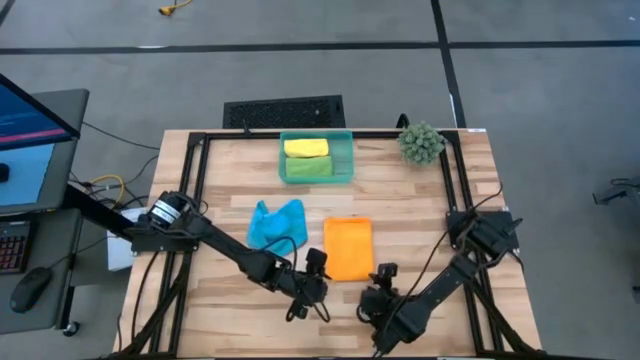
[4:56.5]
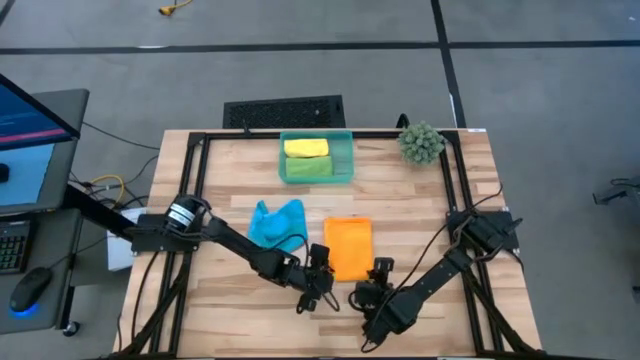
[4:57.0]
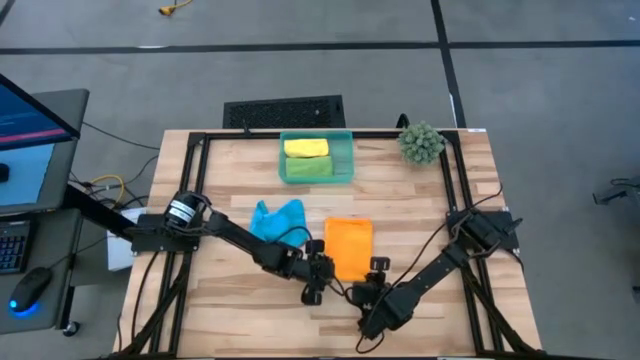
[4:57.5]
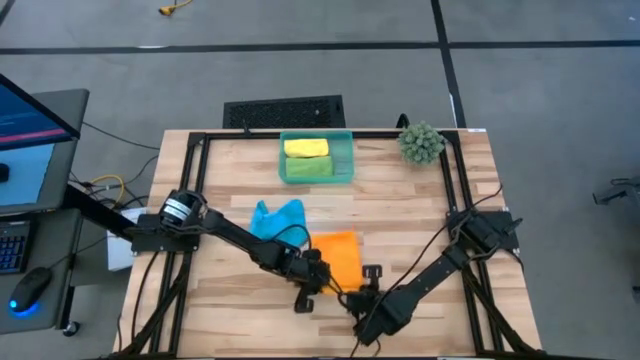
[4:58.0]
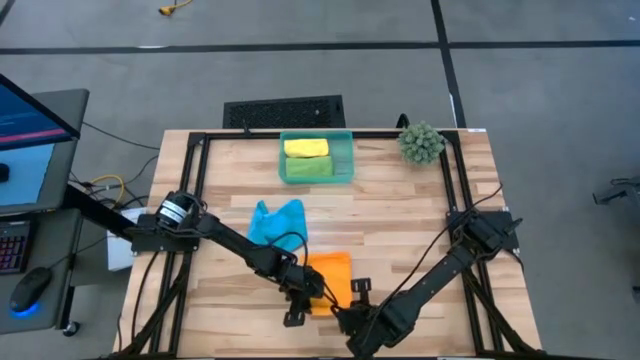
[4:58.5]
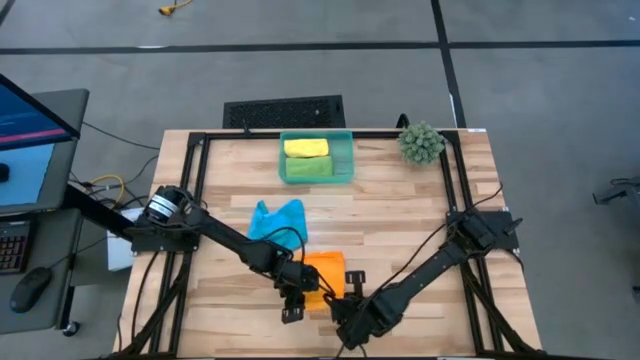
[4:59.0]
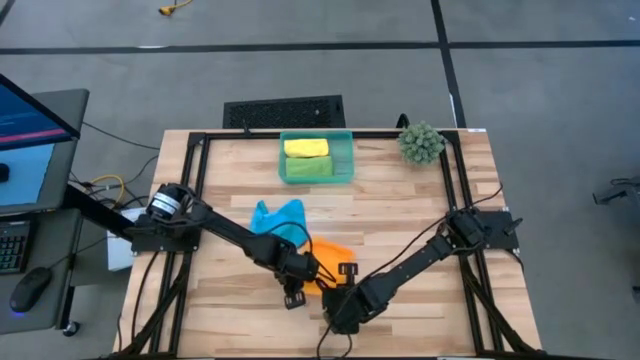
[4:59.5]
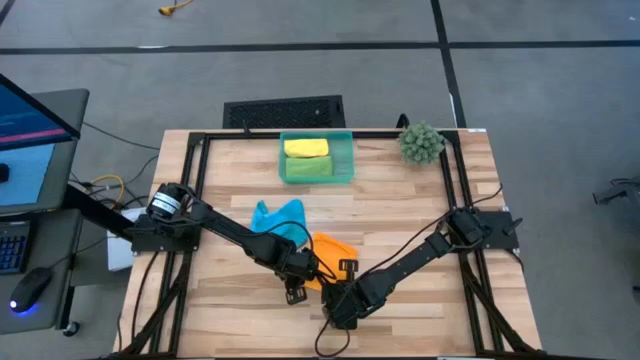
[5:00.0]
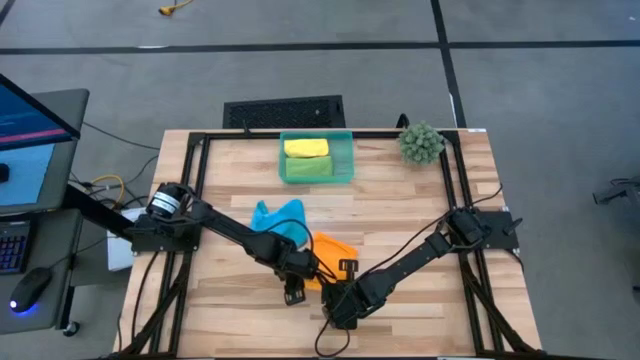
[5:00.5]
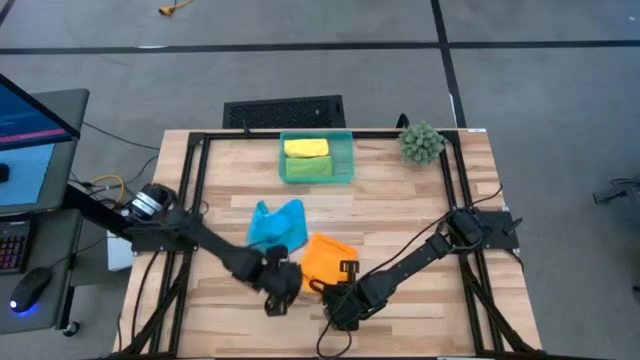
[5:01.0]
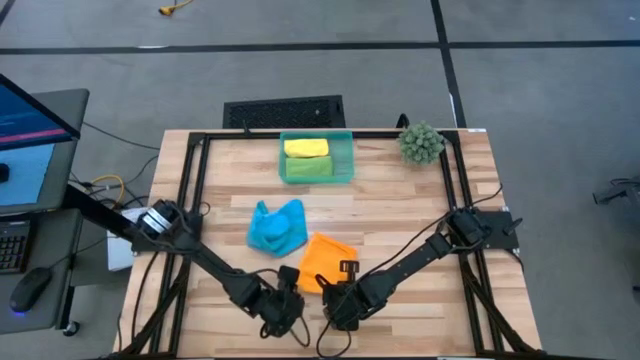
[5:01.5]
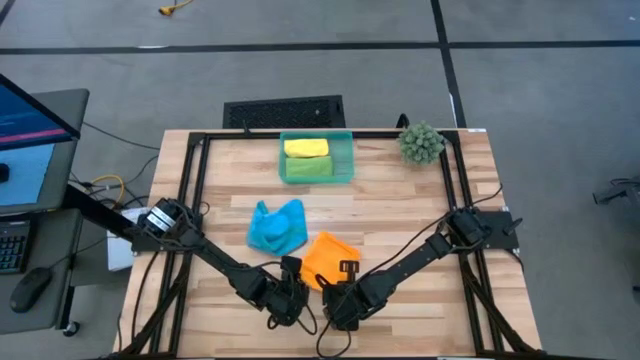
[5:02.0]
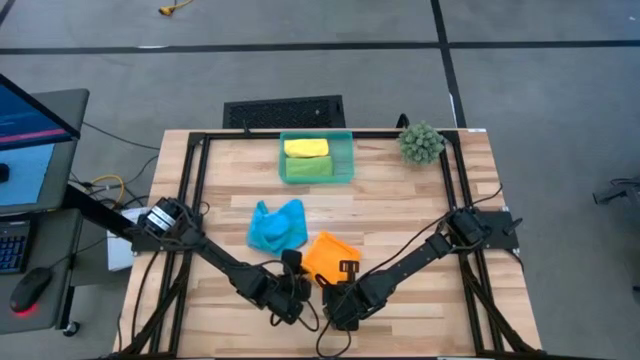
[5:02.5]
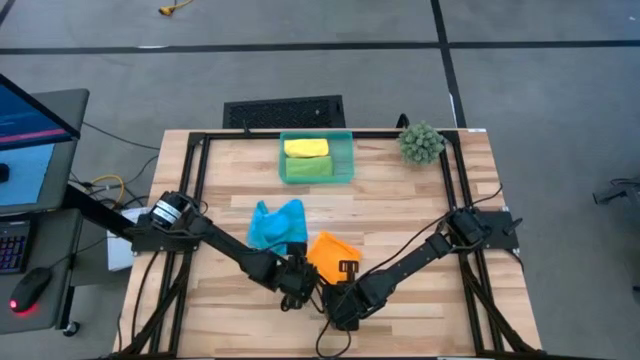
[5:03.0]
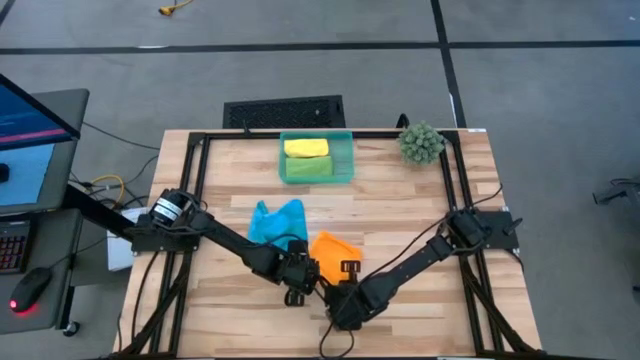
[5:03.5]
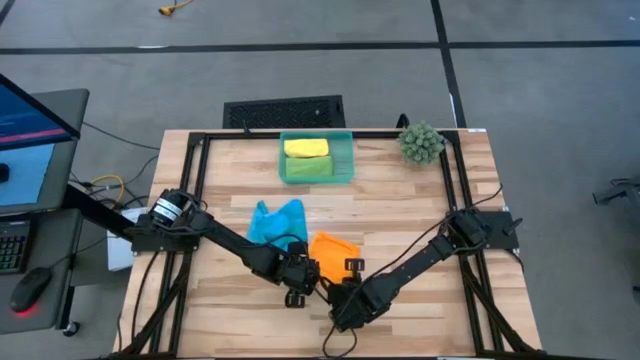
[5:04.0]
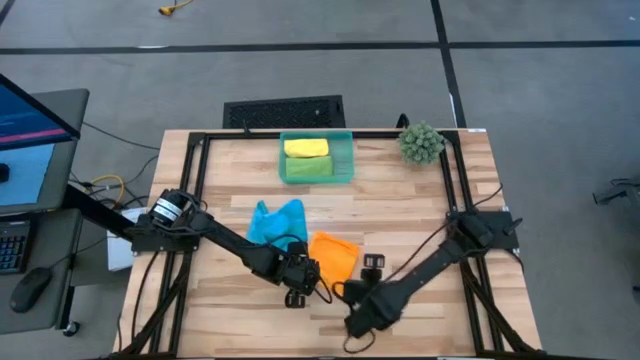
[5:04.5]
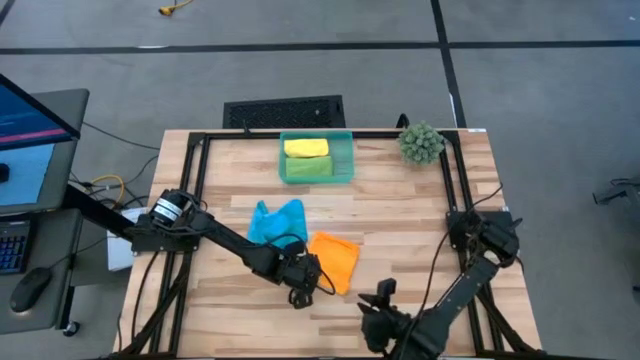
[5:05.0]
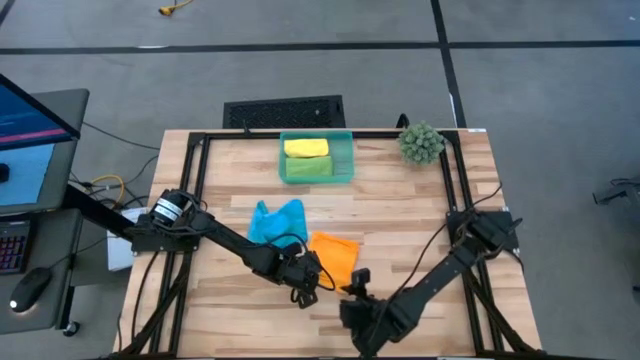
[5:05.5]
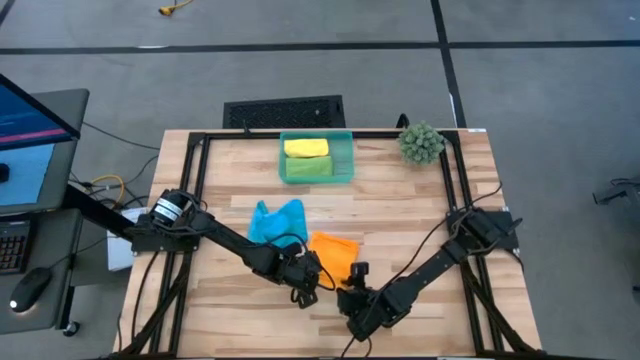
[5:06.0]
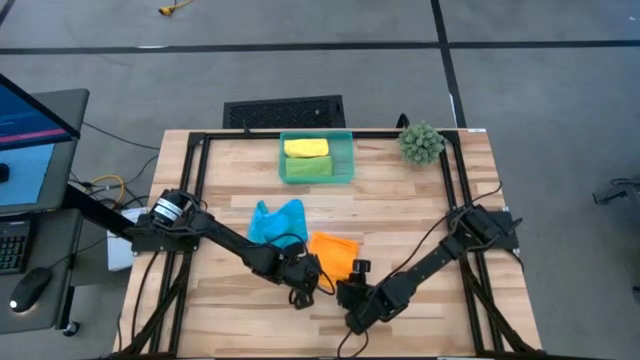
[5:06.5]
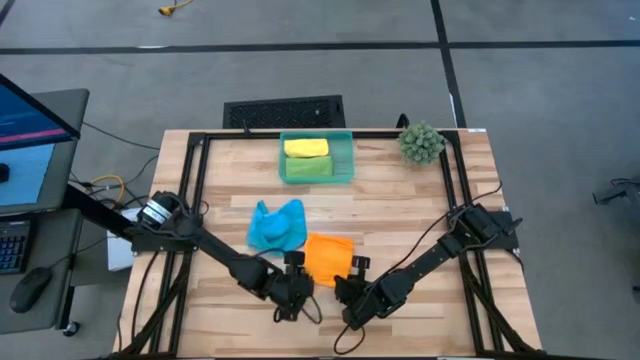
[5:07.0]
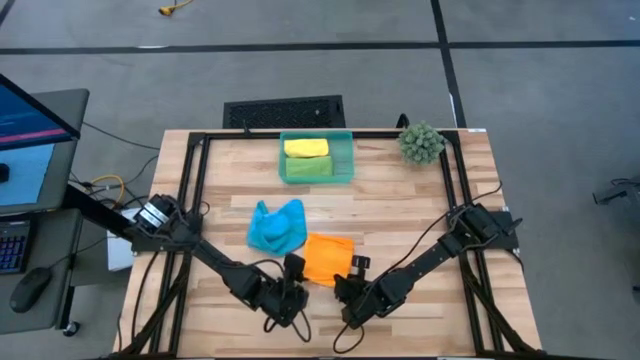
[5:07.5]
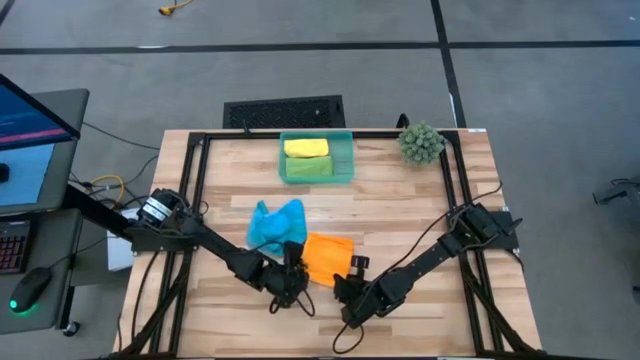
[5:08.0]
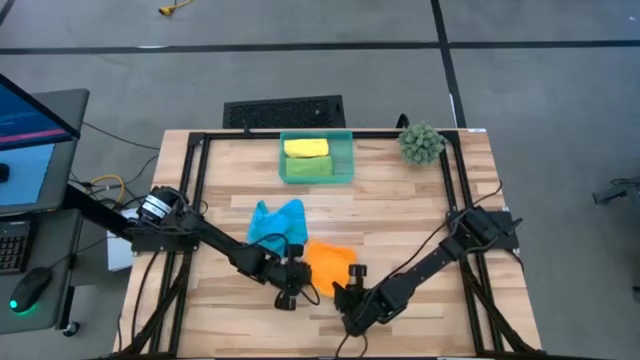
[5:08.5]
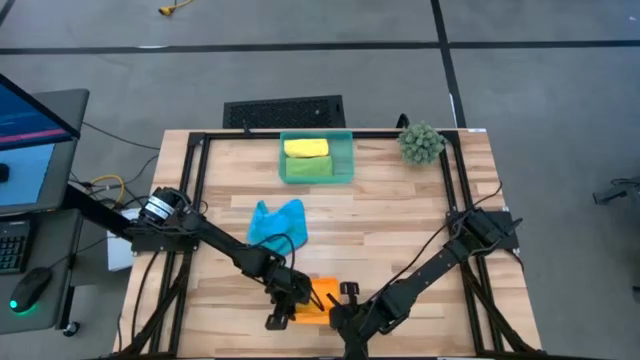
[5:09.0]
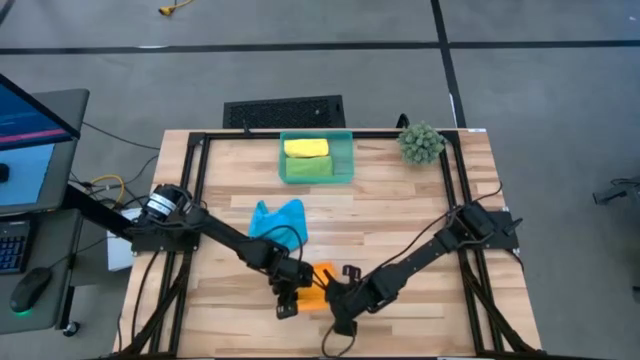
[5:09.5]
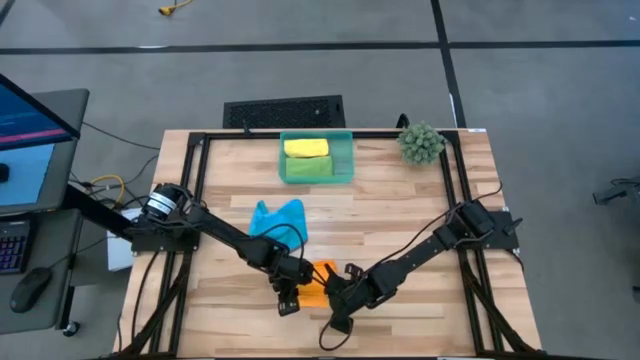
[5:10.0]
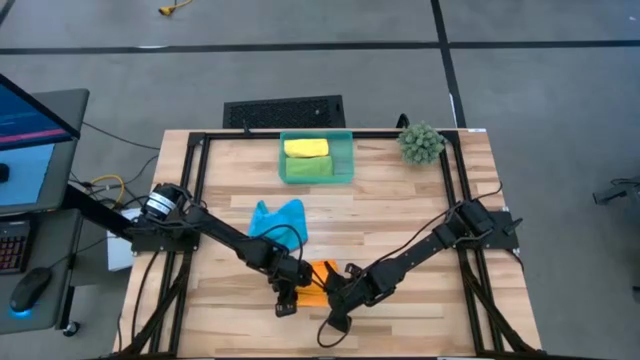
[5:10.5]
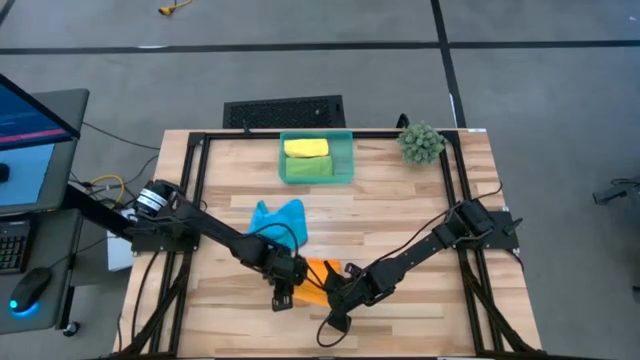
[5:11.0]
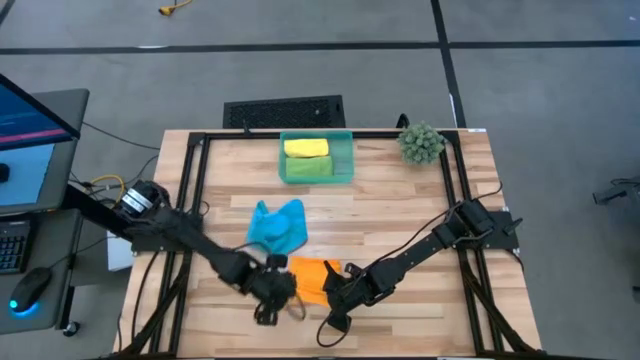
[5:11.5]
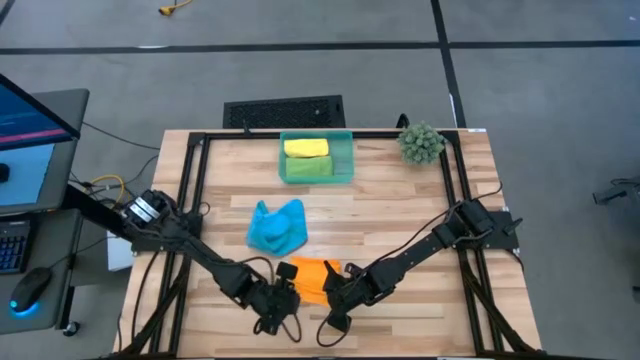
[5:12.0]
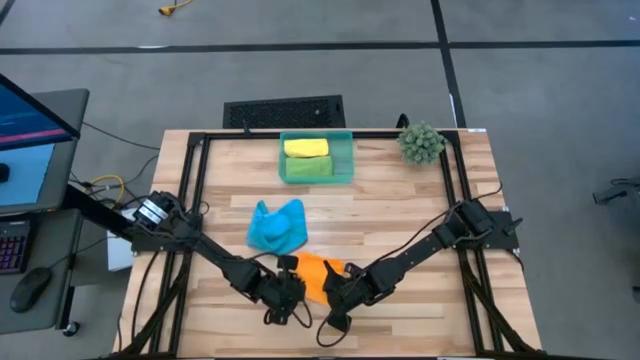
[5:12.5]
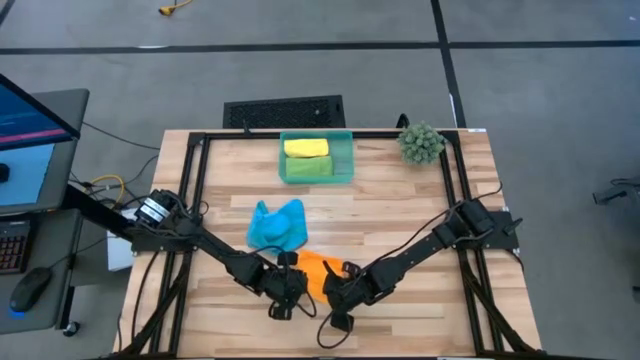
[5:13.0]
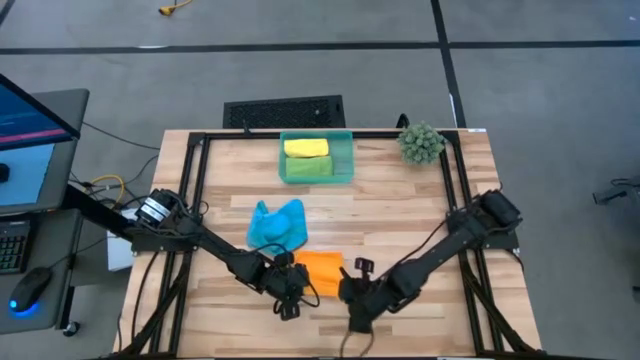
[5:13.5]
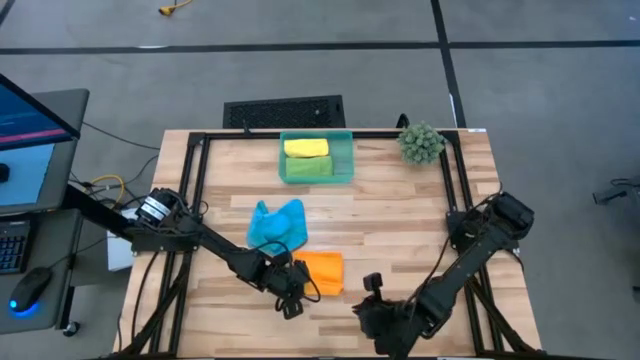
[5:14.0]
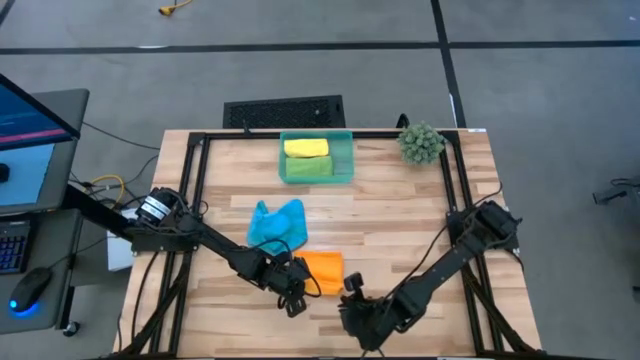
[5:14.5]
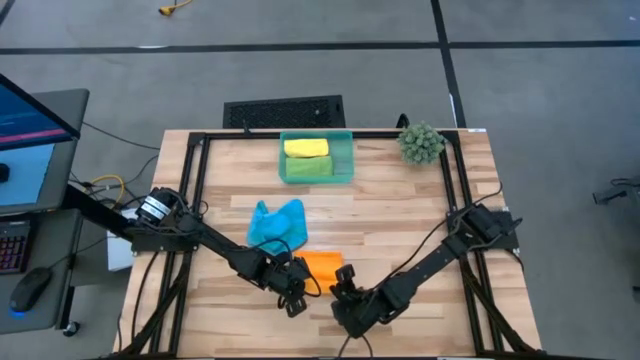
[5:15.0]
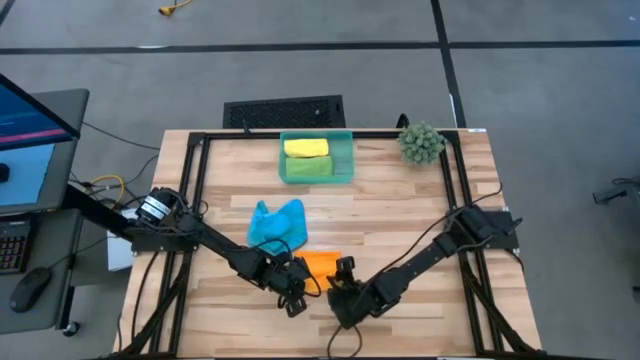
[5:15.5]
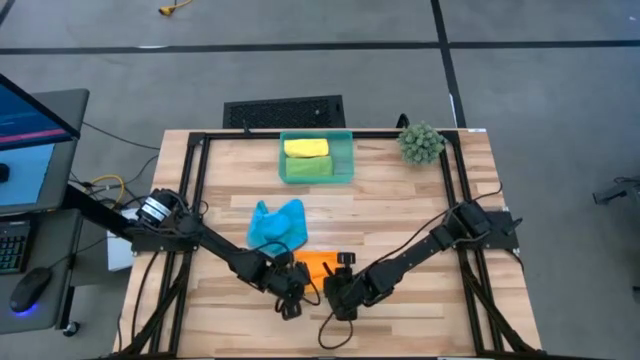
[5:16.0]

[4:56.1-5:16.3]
Task: Roll microfiber towels into tight, uniform cylinder then place into a basket
Roll the orange microfiber cloth
